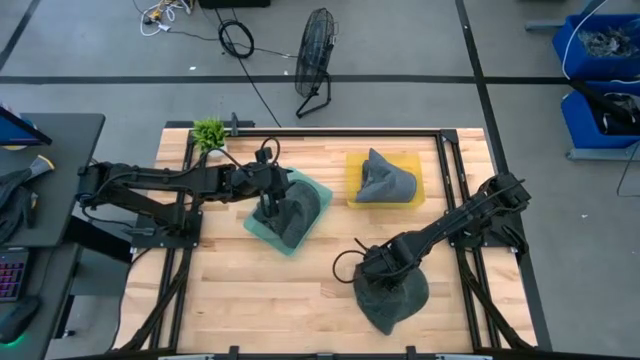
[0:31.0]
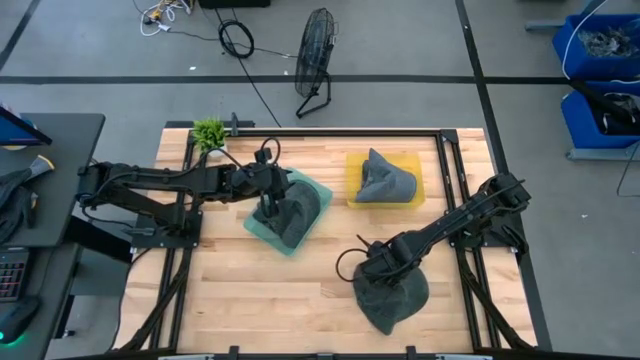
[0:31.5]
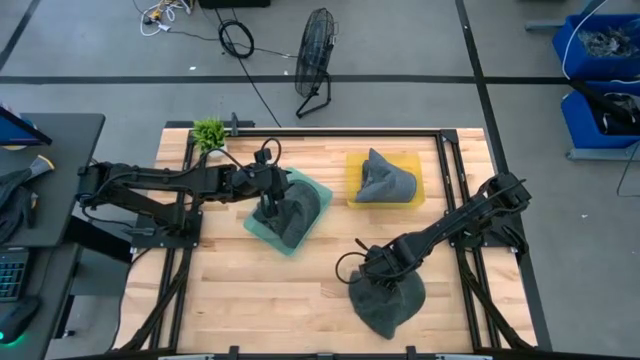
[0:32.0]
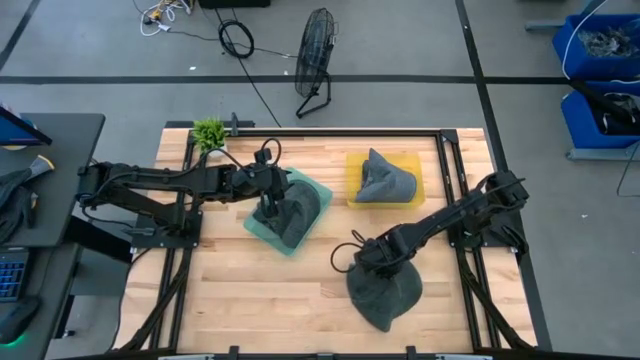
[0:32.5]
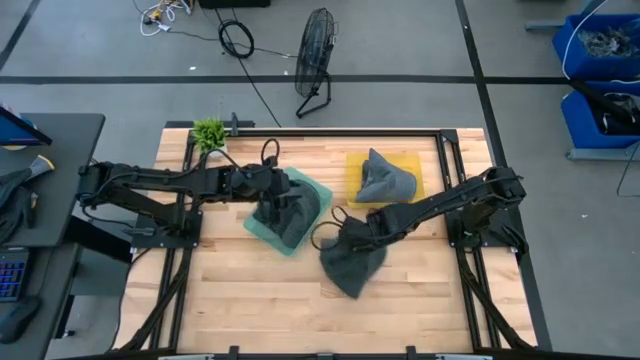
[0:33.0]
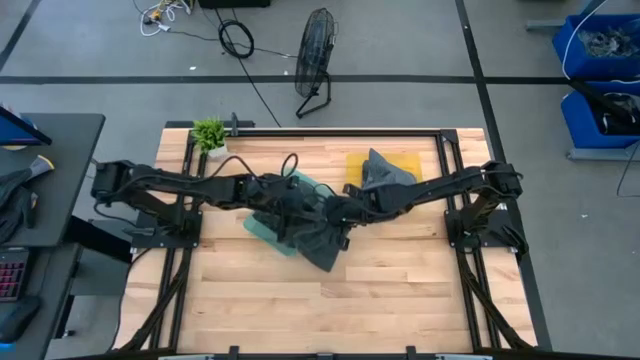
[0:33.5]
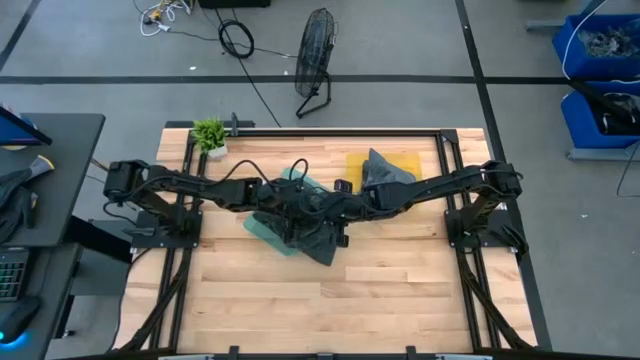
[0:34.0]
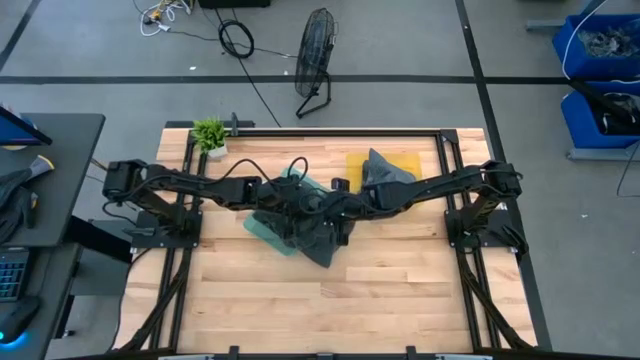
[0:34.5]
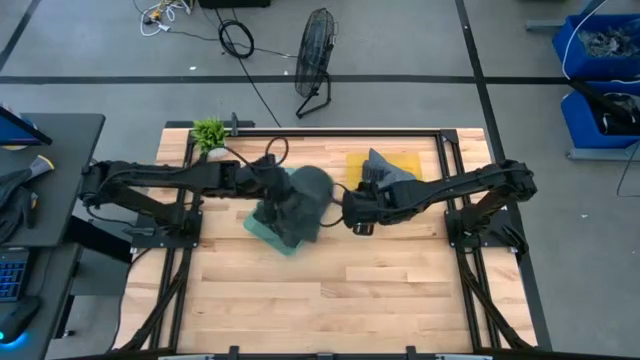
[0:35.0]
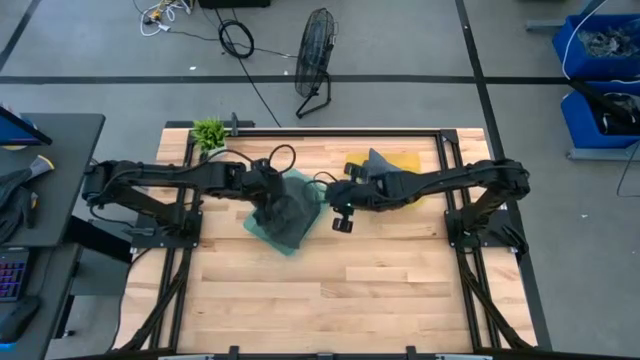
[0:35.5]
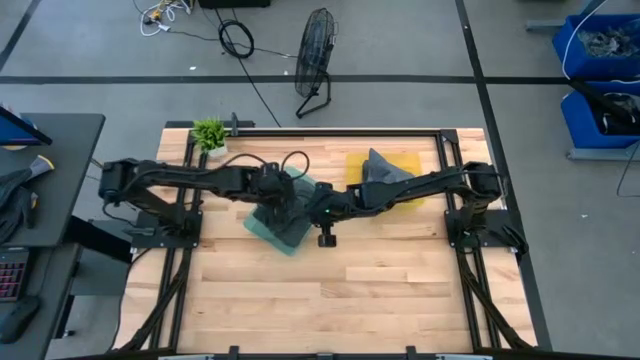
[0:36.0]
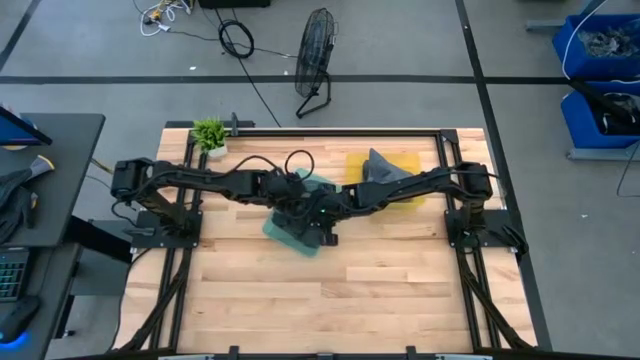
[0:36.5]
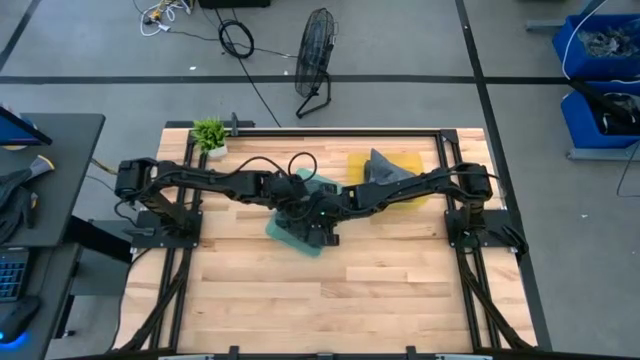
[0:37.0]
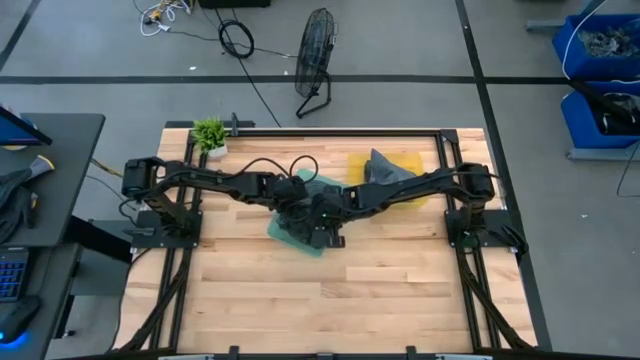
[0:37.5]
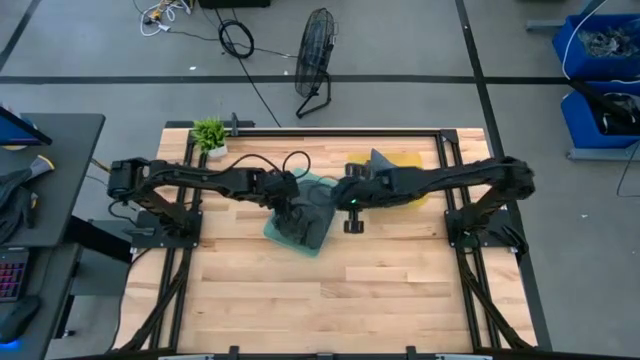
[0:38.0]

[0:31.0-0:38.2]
Task: Pick & Place hat
Put the black cap into the green bin

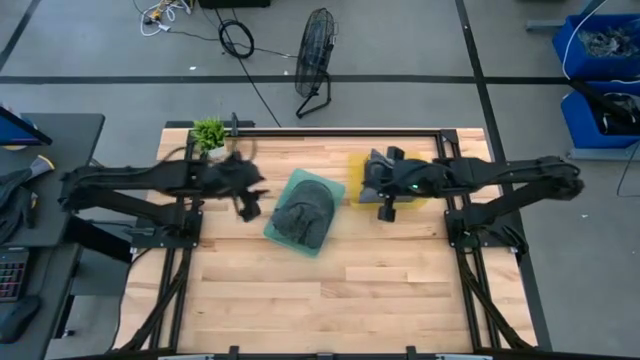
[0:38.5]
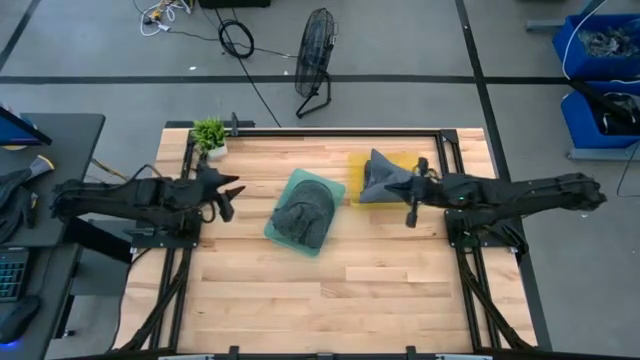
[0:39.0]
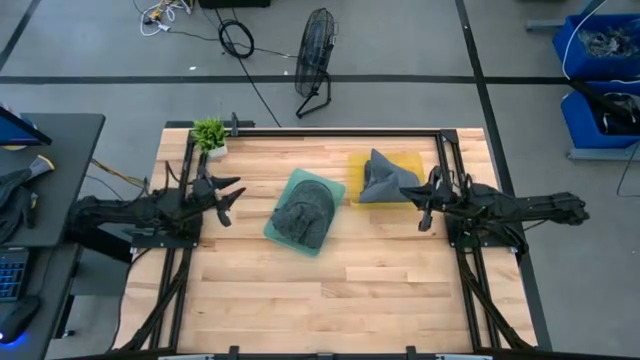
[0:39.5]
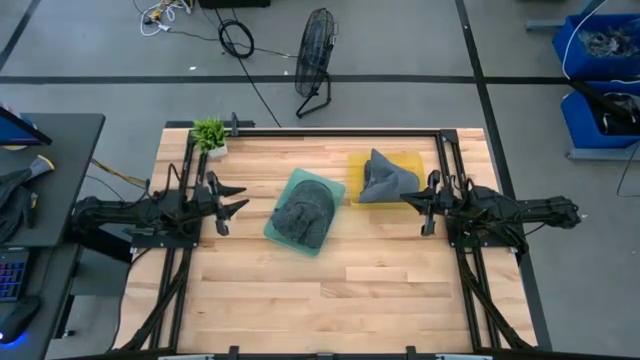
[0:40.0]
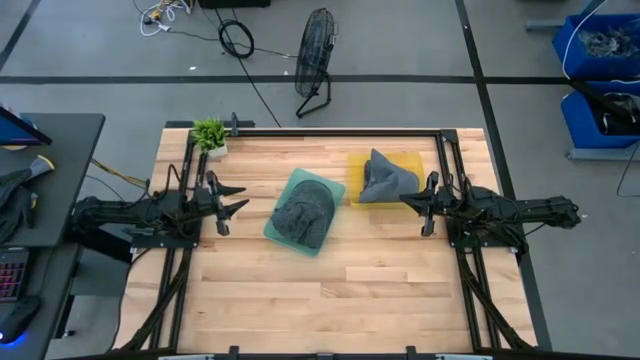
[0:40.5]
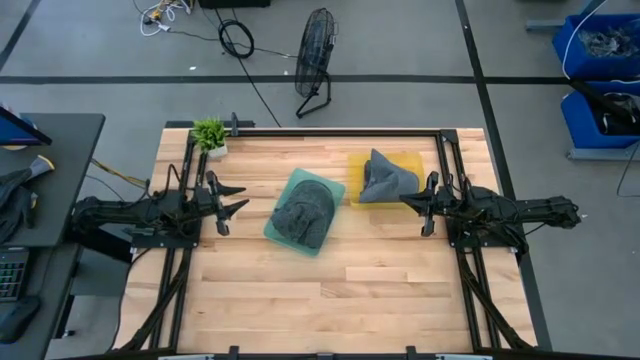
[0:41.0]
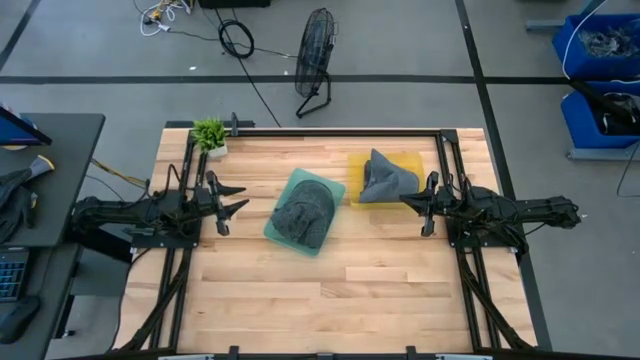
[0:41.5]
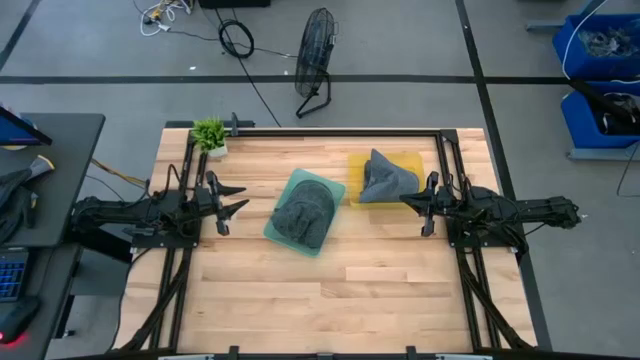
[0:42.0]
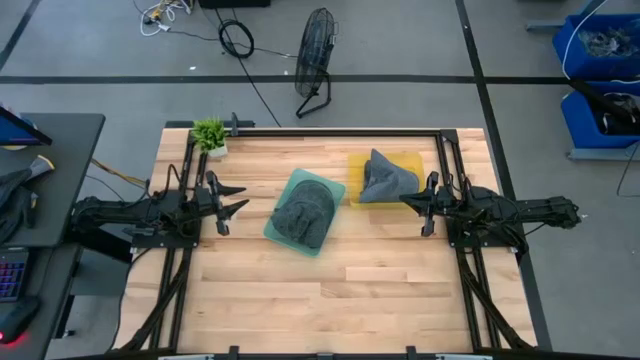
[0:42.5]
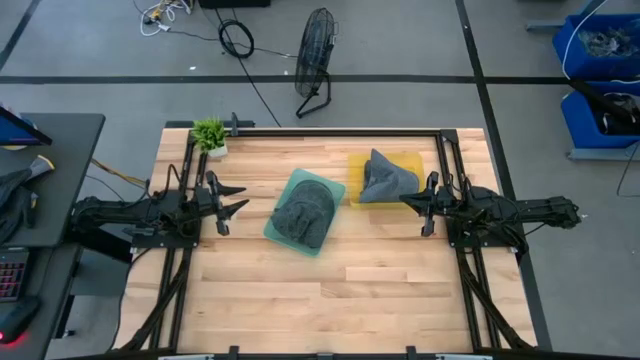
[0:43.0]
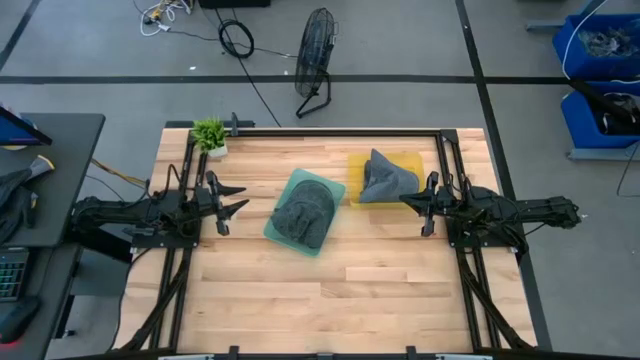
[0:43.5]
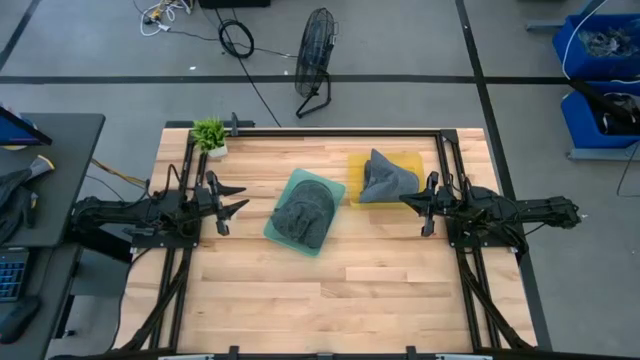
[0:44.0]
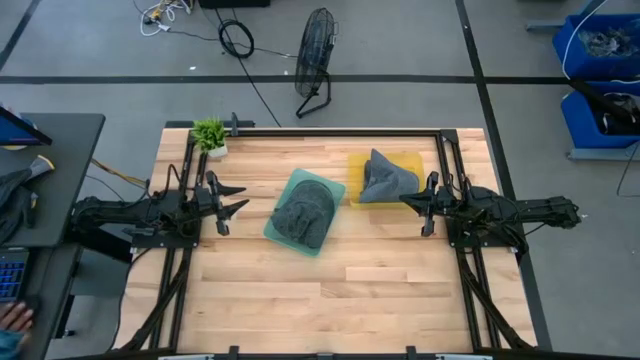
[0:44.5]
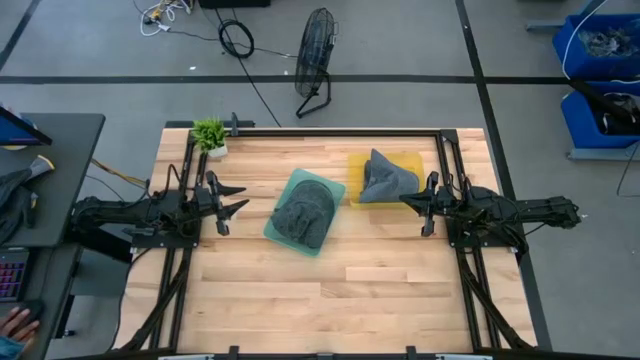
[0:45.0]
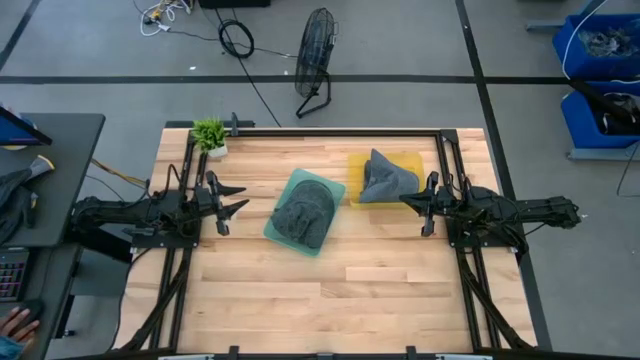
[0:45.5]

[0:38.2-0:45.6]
Return to home position

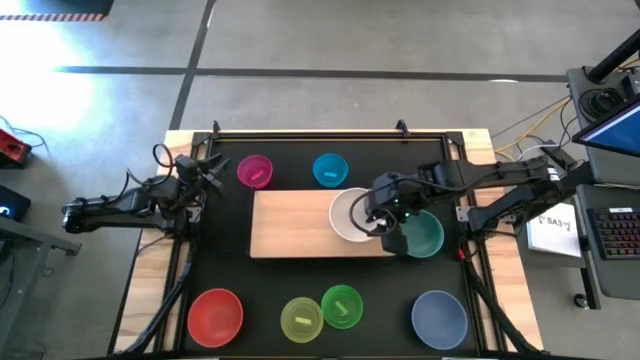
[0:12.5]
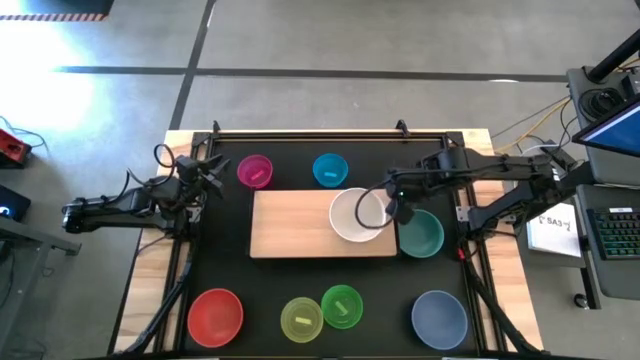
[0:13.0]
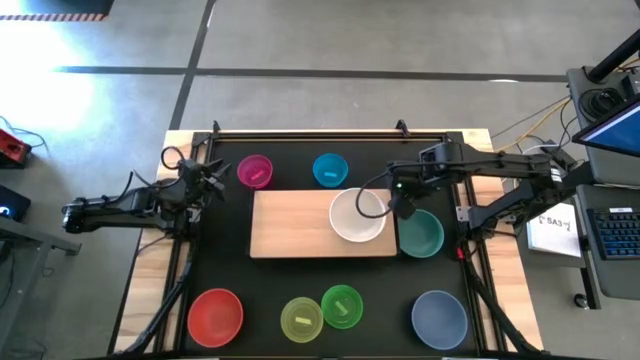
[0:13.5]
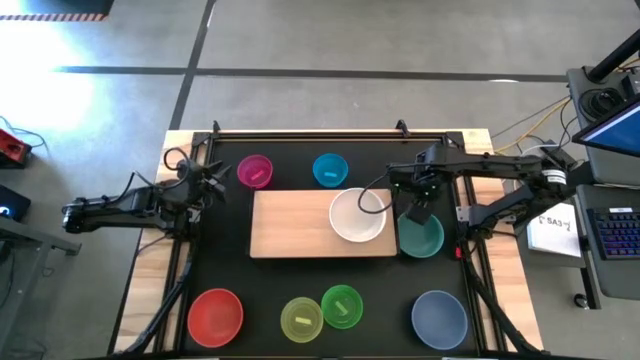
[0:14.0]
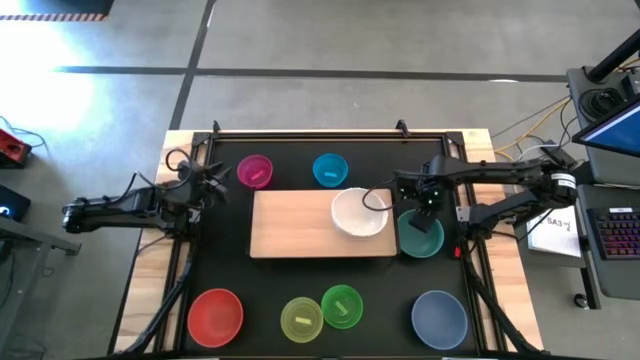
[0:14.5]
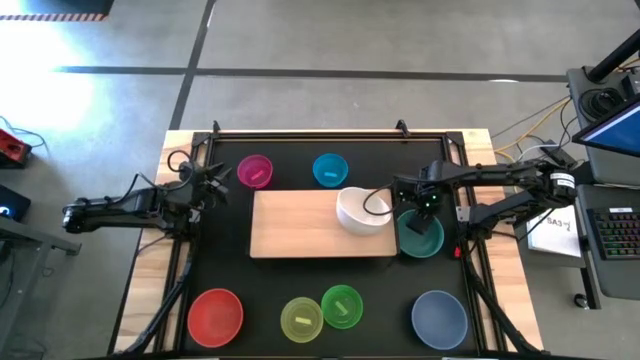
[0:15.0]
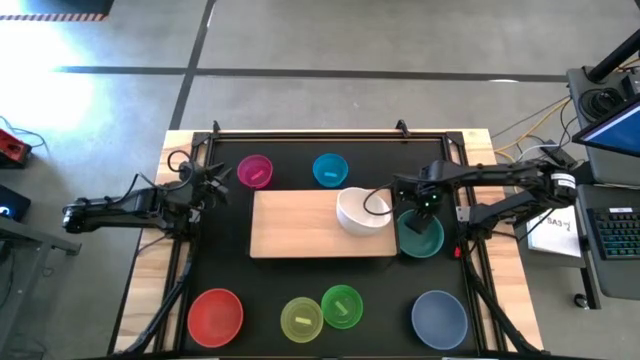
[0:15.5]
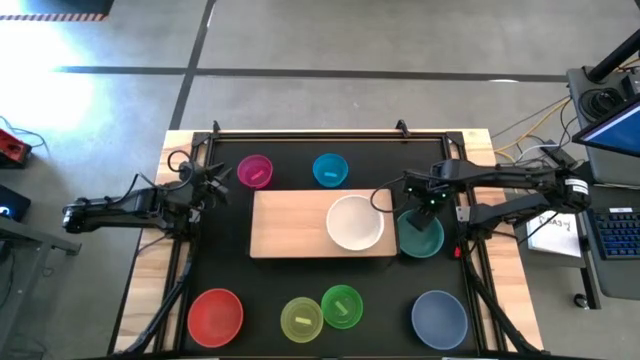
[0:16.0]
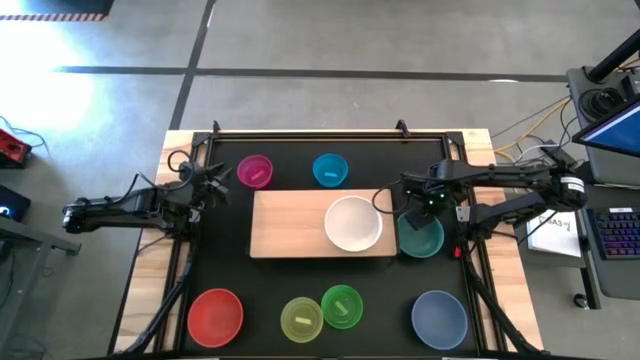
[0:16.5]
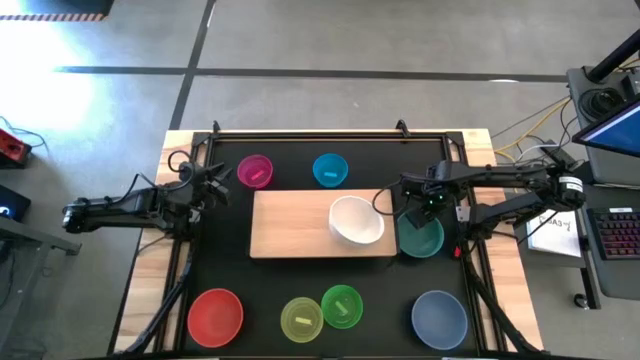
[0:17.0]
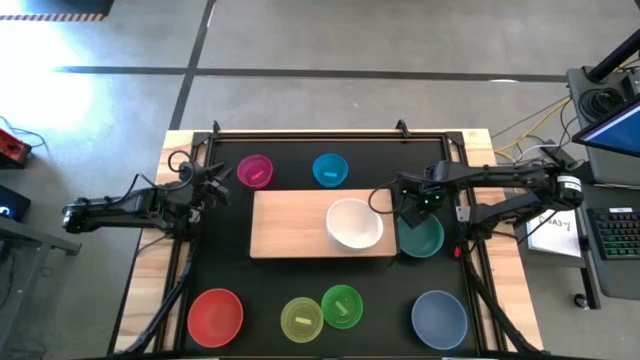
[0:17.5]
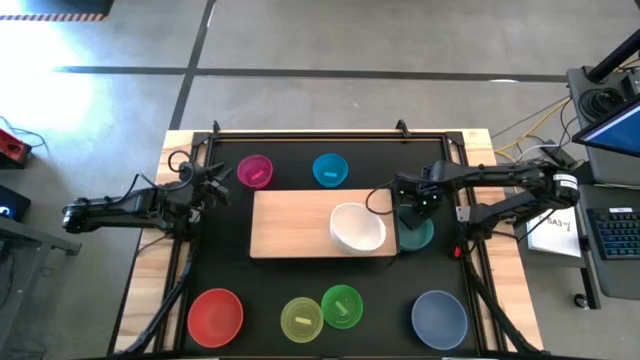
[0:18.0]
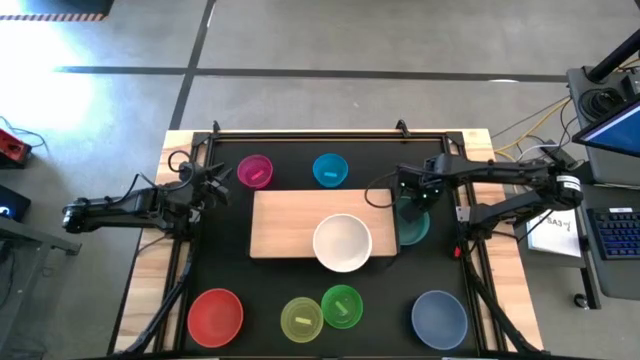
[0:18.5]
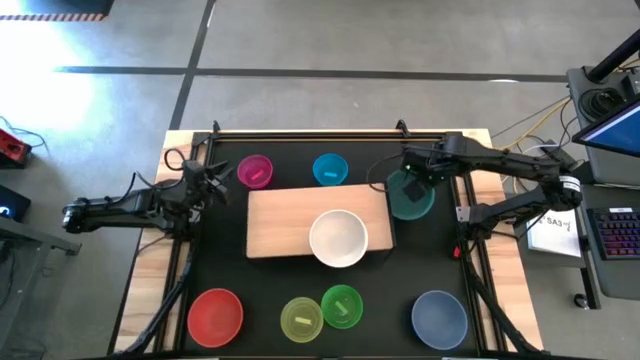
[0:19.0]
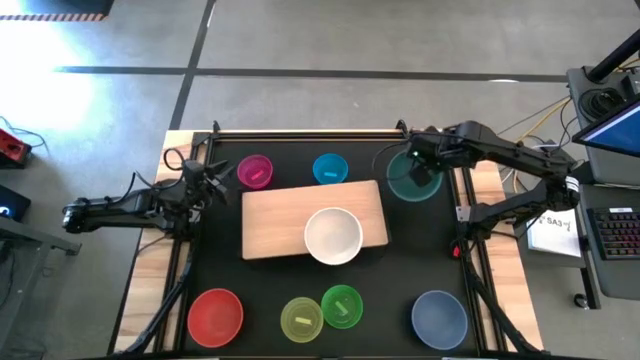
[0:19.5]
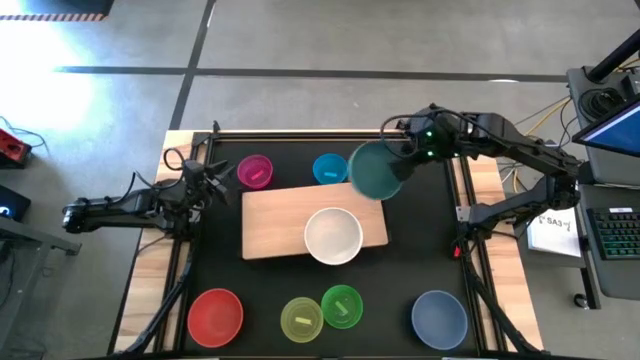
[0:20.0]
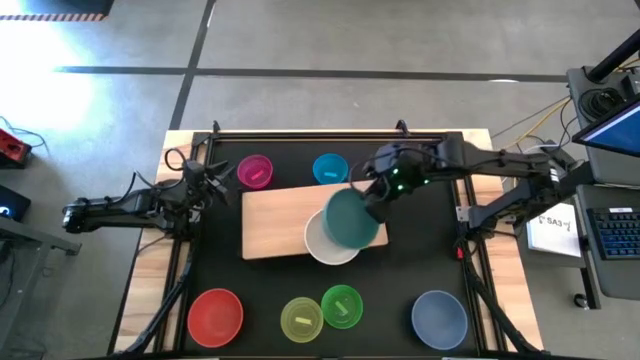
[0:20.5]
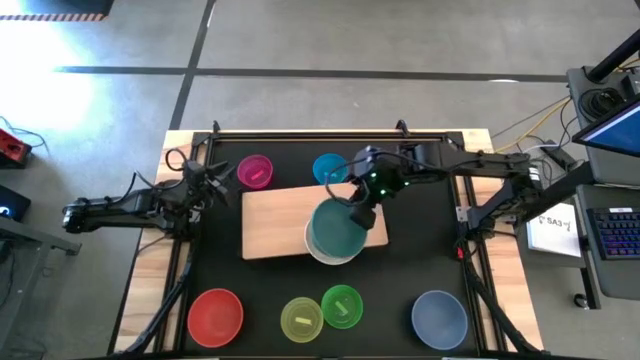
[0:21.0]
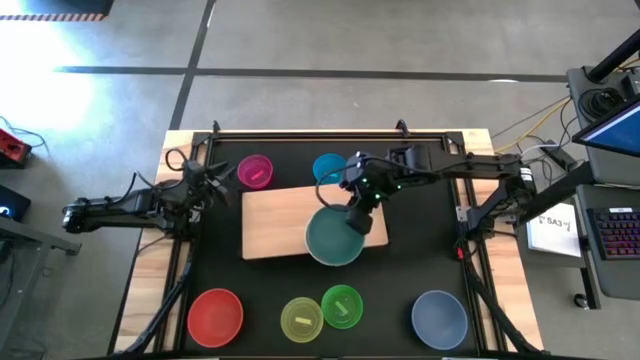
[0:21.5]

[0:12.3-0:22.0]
Task: Place and stack bowls onto a shelf
Stack the large green bowl on top of the large white bowl on the shelf
